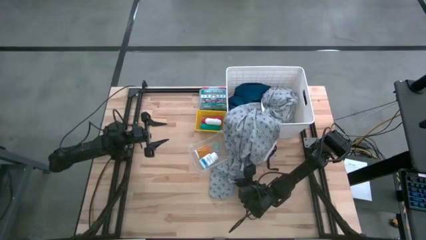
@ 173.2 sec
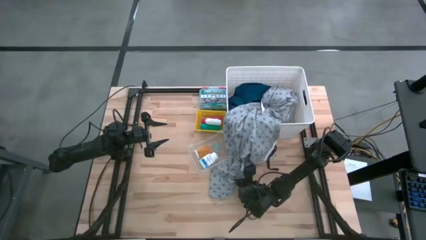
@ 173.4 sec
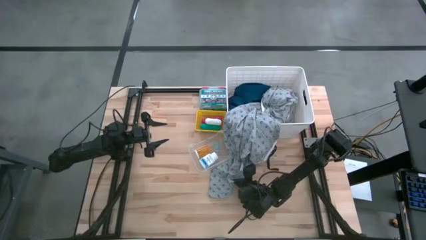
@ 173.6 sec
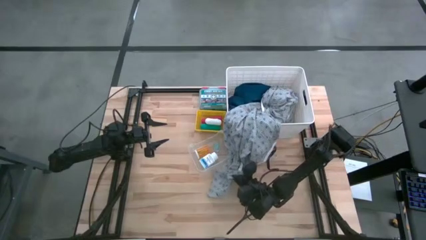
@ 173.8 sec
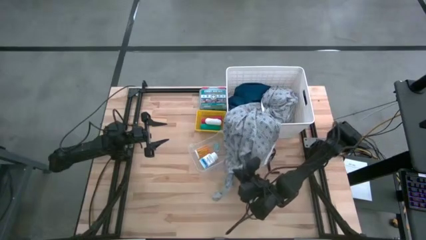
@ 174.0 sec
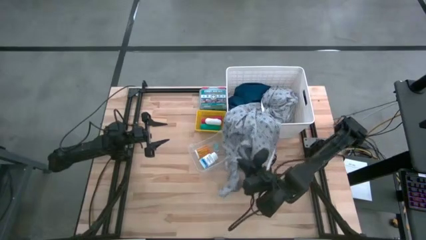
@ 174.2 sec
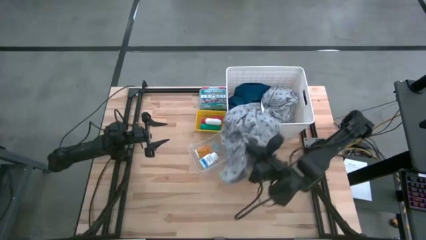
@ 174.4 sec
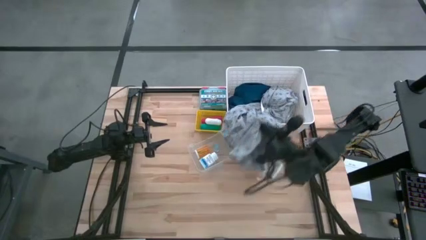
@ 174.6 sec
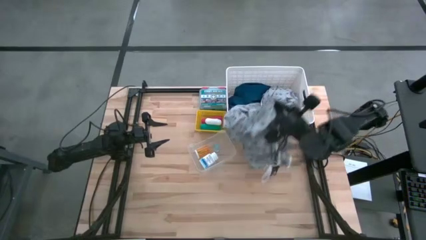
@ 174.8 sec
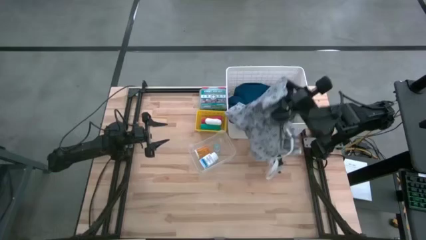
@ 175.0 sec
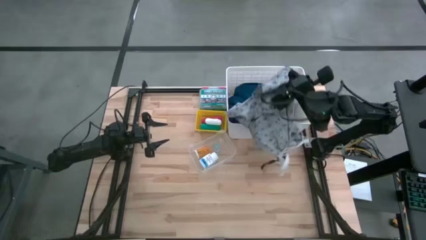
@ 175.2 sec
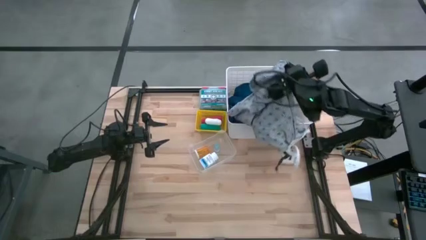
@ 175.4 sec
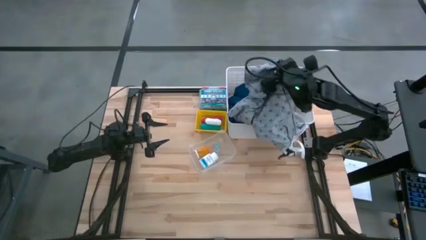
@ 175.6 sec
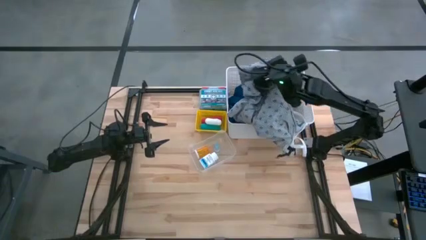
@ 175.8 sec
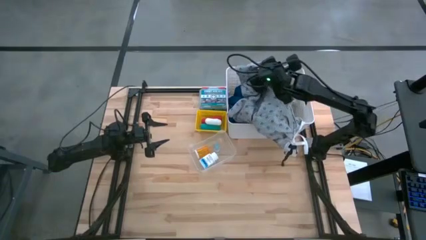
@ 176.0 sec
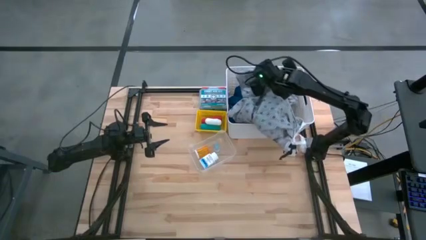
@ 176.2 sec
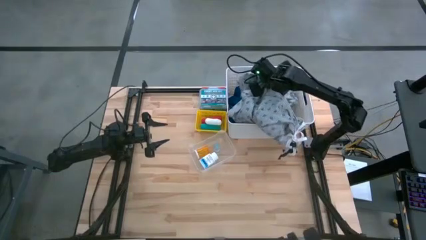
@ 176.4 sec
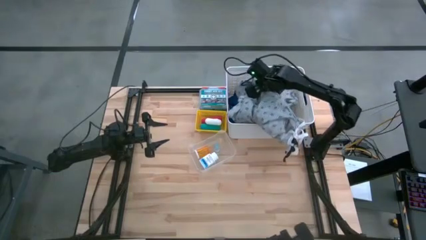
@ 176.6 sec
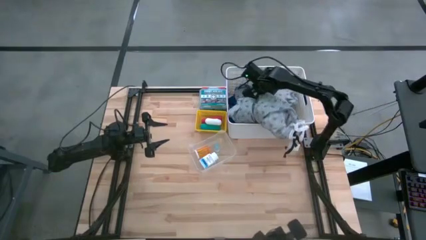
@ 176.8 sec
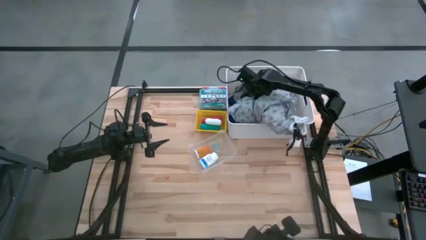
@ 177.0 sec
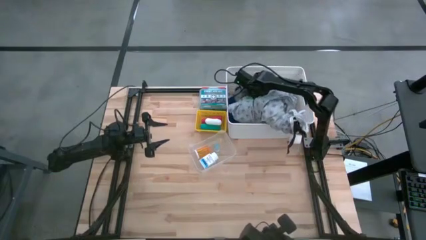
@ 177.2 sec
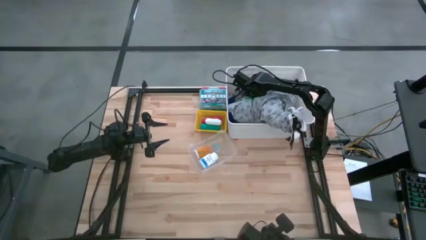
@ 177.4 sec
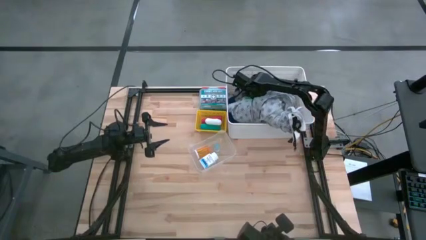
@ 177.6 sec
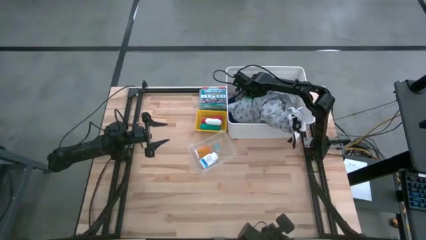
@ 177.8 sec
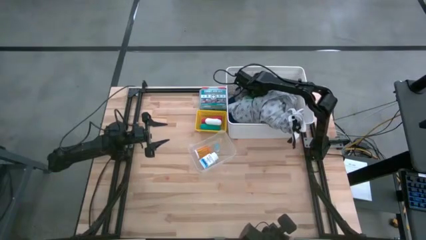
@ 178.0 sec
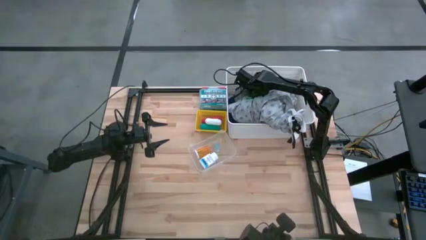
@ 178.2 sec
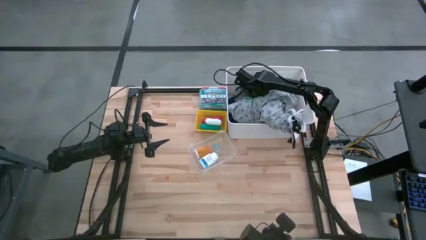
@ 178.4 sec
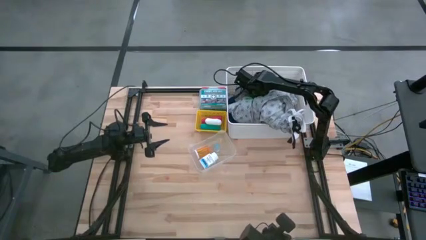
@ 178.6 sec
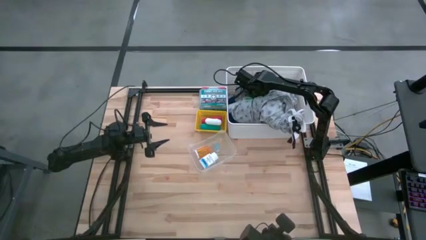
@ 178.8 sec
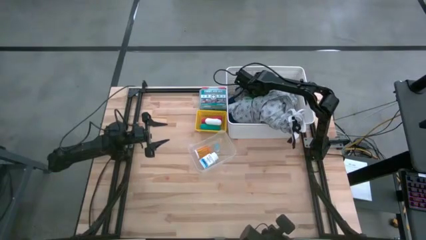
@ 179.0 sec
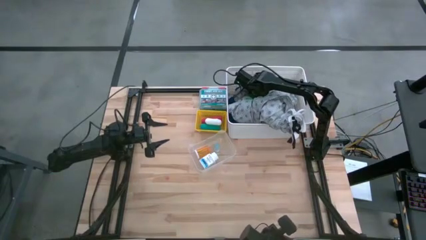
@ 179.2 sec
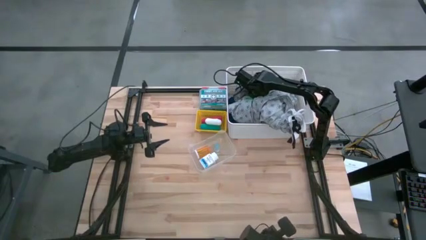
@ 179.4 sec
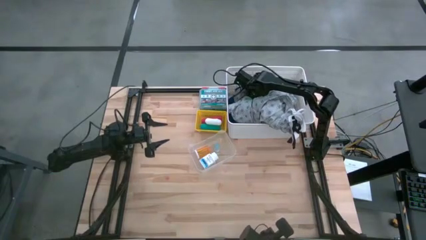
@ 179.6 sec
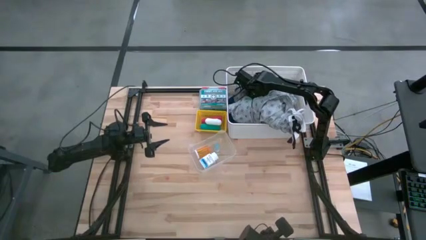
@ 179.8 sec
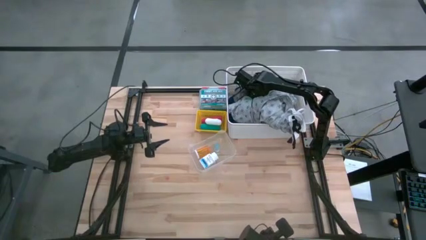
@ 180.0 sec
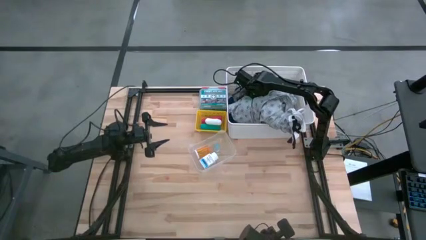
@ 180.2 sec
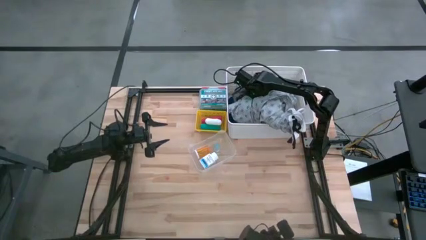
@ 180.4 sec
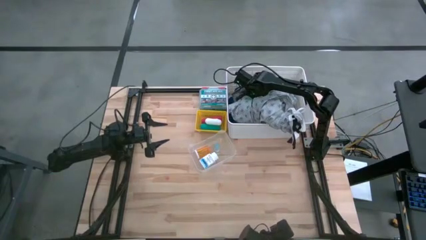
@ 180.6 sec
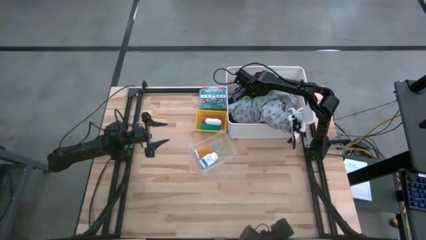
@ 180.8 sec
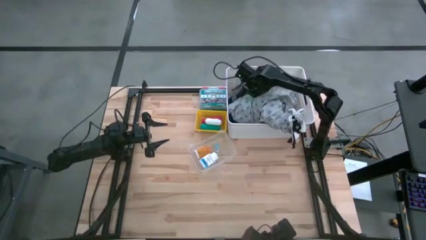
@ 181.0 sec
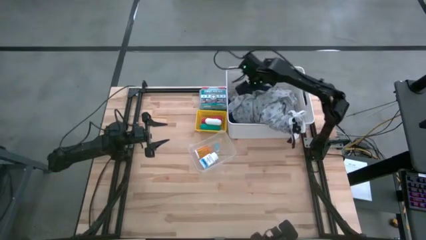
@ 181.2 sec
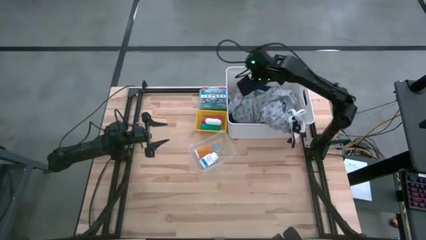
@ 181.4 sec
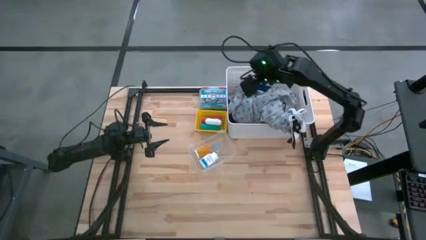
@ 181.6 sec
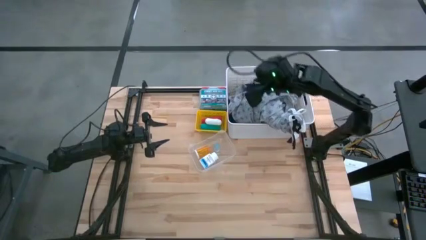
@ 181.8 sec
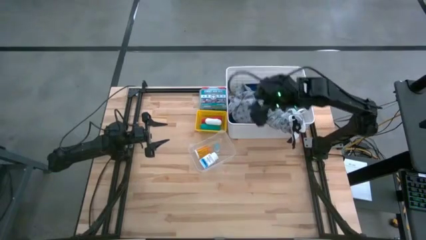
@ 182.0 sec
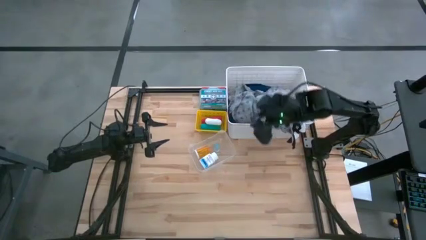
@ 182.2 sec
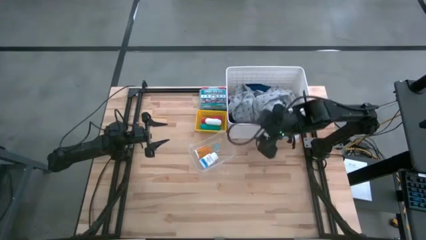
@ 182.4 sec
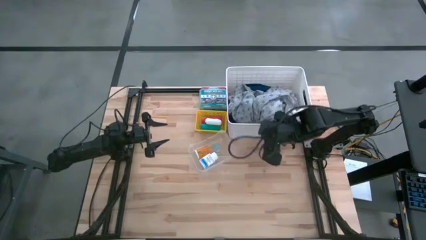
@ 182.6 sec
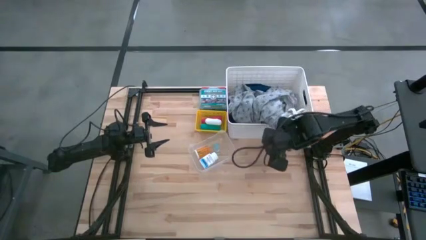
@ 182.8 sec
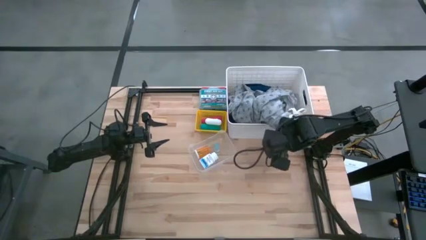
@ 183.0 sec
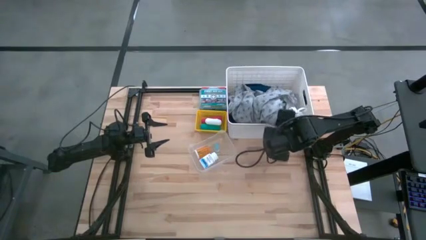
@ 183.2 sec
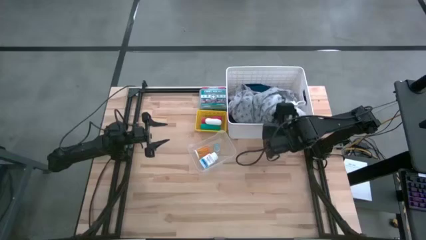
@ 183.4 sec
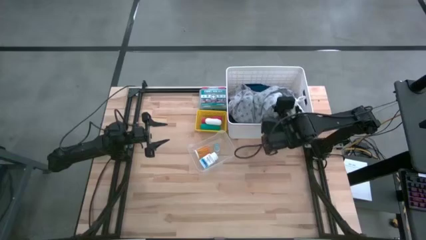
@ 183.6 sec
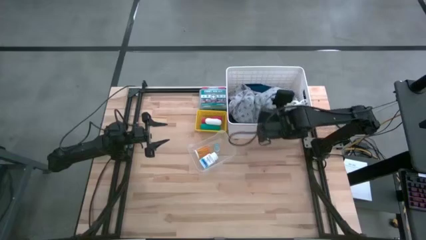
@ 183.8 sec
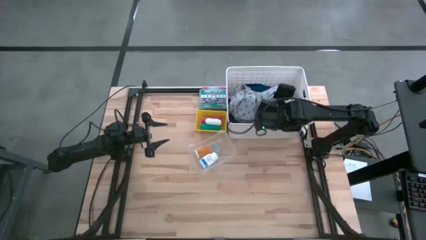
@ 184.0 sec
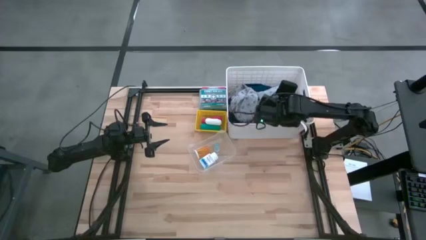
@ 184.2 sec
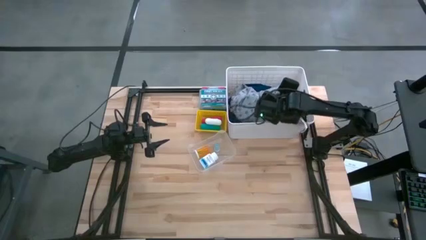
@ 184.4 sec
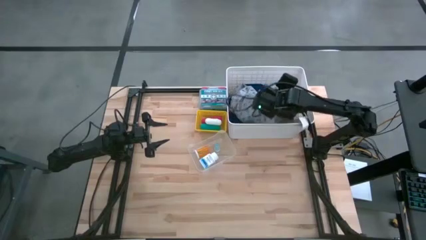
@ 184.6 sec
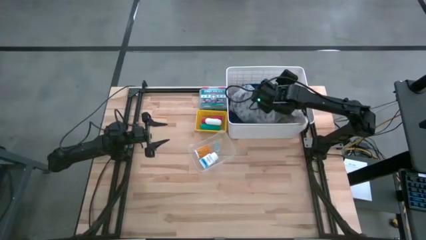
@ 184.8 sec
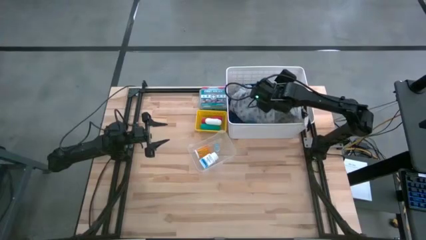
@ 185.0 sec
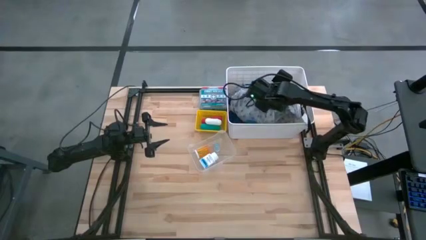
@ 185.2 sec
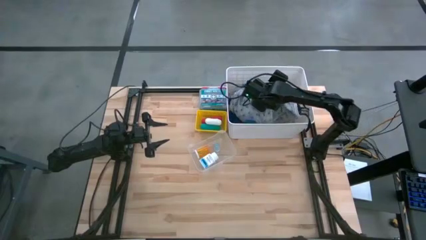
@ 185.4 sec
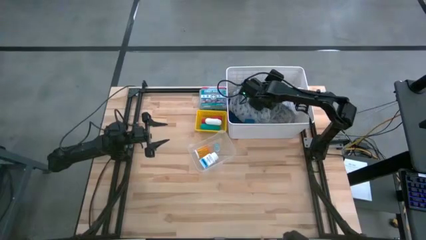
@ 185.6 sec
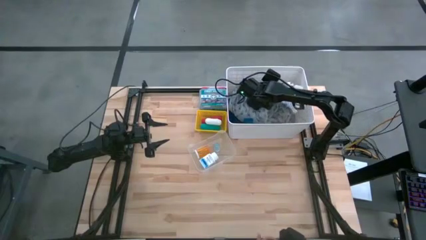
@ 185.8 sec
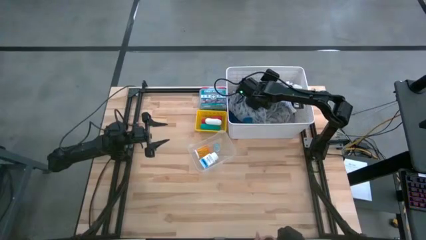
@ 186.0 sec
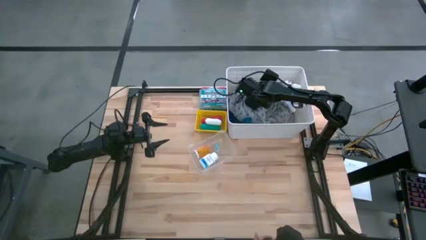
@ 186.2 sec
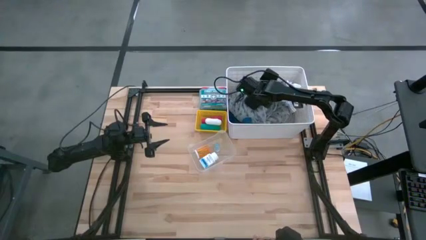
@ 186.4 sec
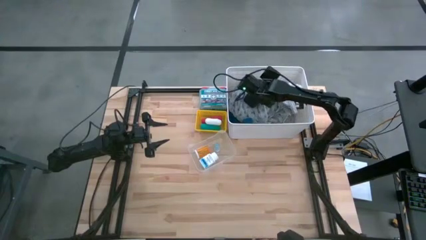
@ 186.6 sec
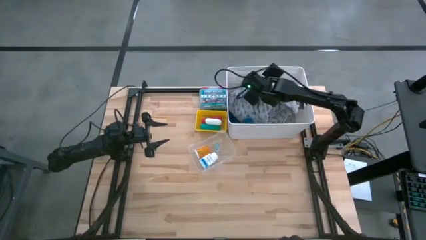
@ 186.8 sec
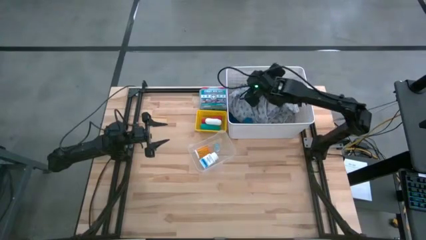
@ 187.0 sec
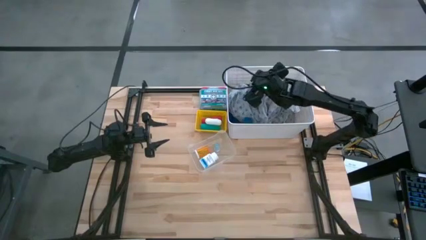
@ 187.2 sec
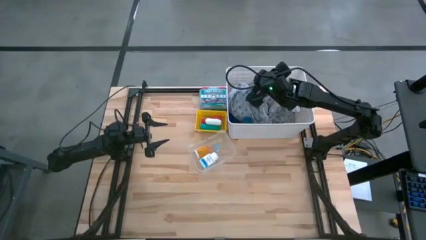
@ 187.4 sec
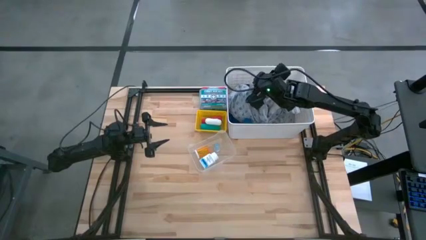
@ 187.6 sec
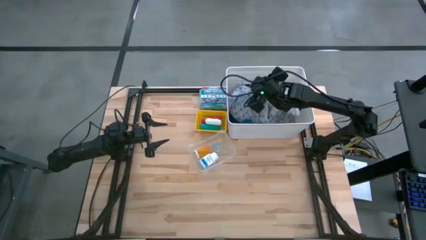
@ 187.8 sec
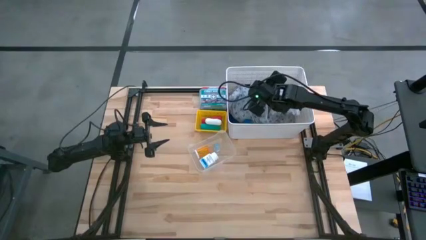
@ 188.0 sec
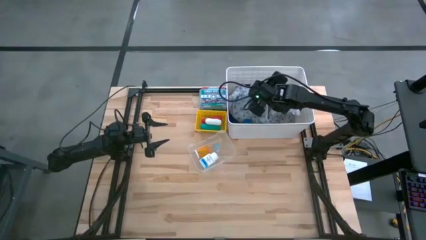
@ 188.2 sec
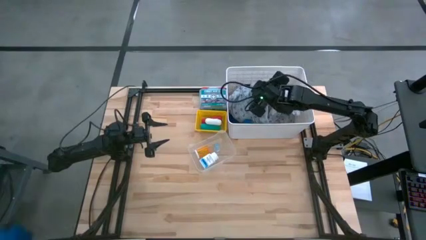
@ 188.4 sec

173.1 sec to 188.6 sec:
Task: Pick & Place Medicine items
Put the gray patient gown into the white bin
